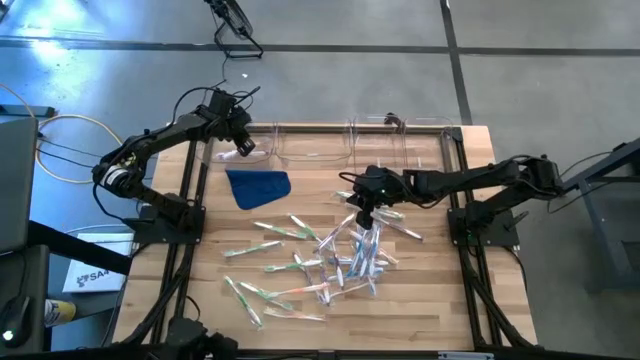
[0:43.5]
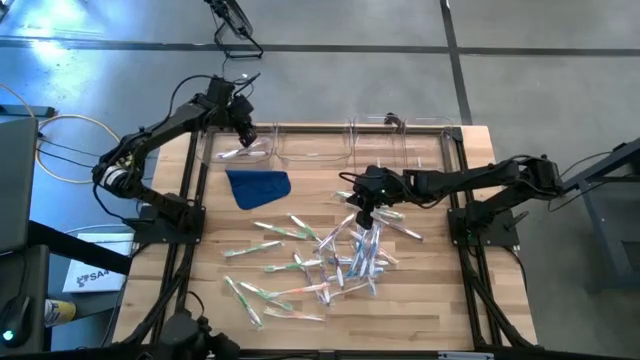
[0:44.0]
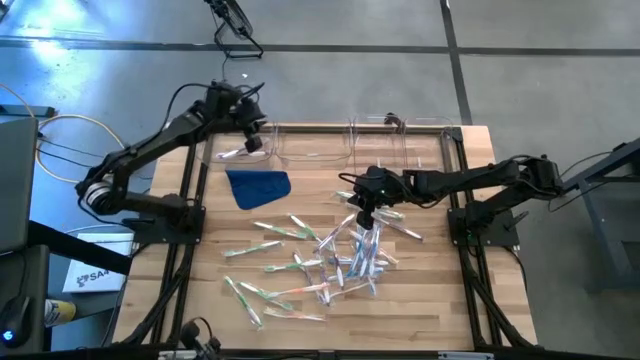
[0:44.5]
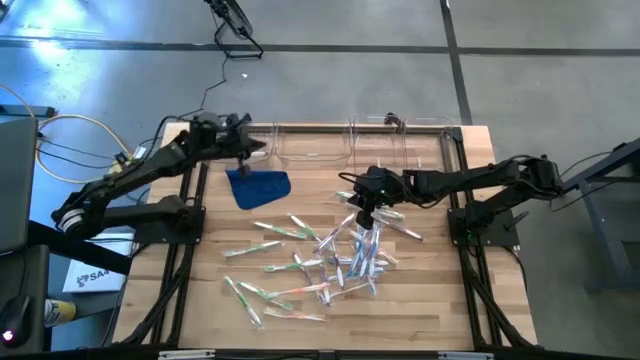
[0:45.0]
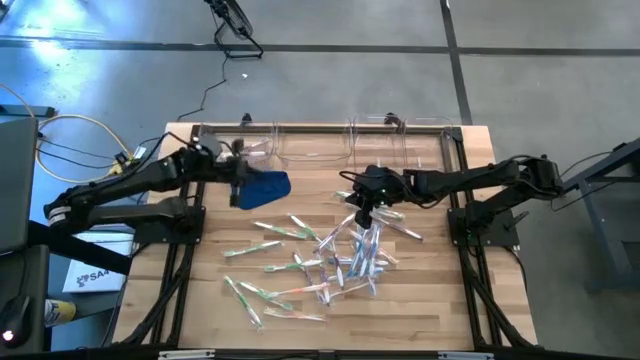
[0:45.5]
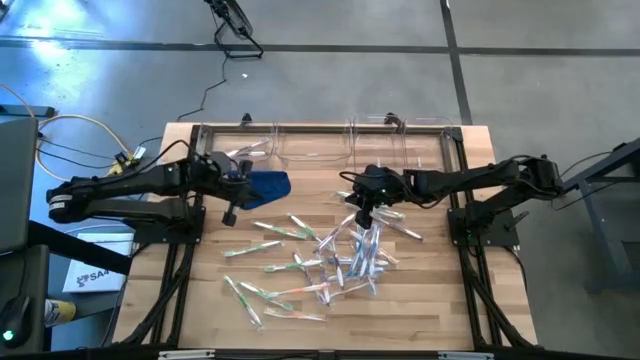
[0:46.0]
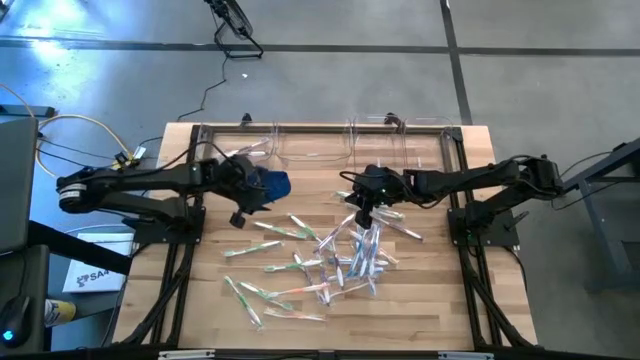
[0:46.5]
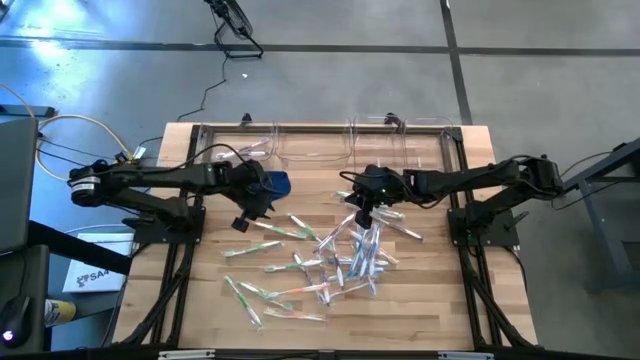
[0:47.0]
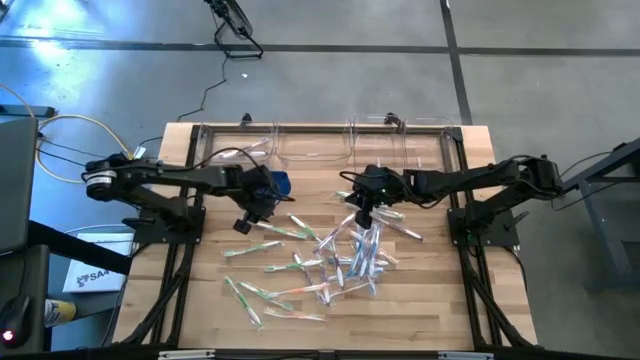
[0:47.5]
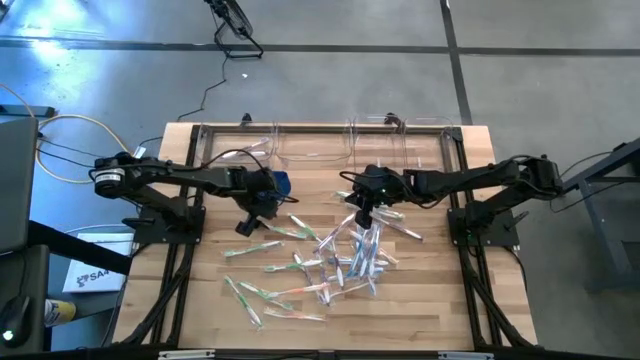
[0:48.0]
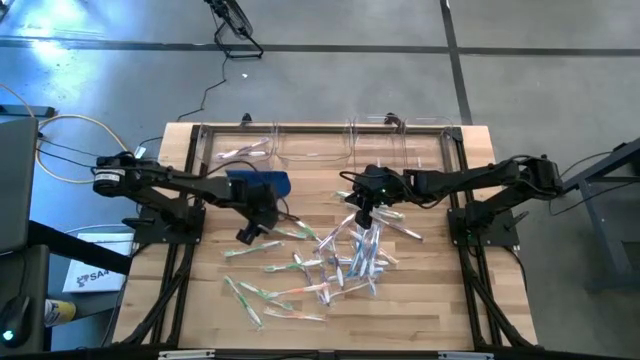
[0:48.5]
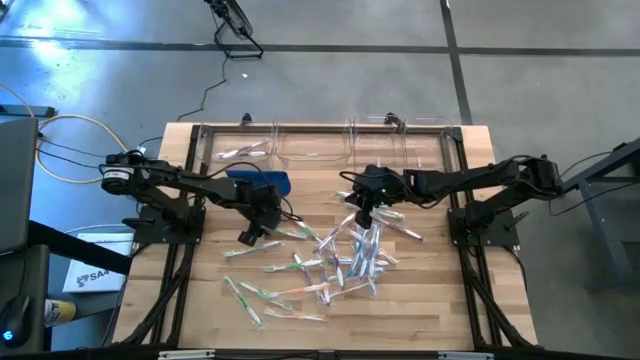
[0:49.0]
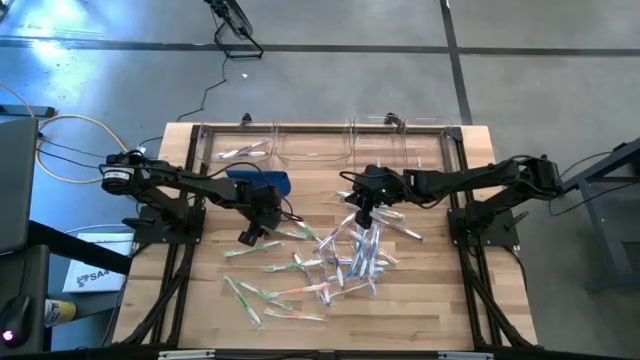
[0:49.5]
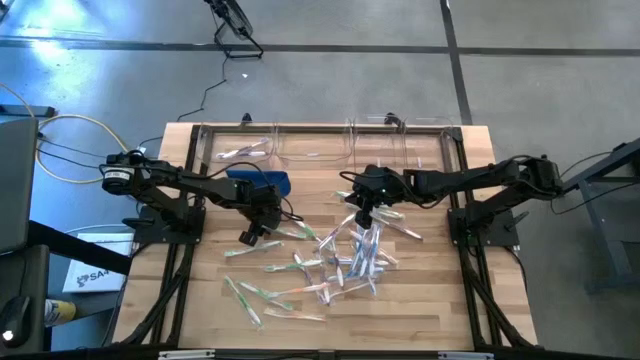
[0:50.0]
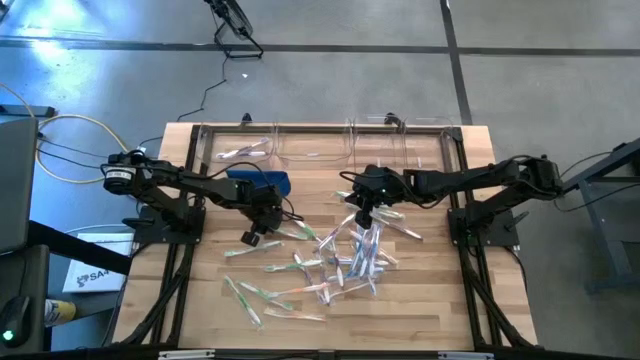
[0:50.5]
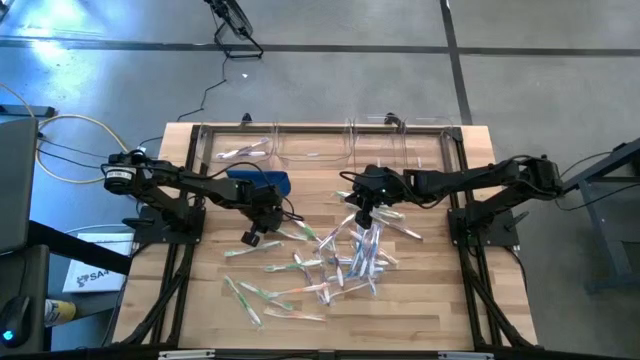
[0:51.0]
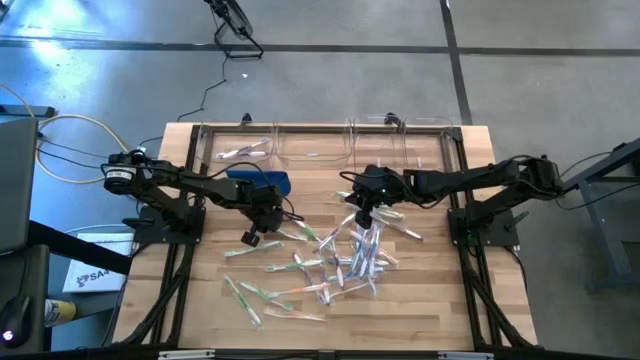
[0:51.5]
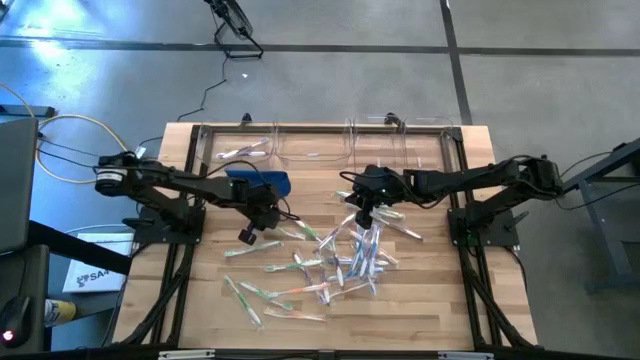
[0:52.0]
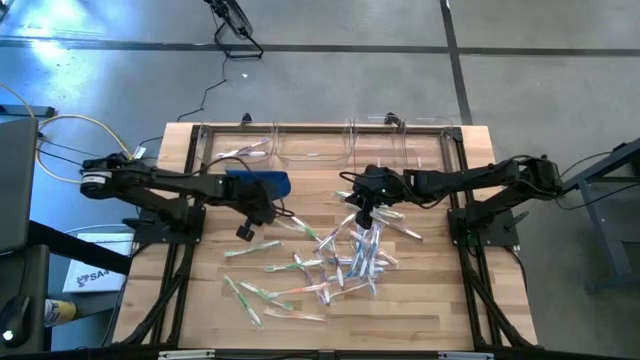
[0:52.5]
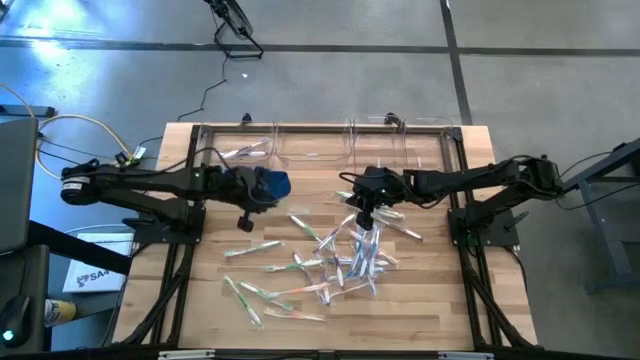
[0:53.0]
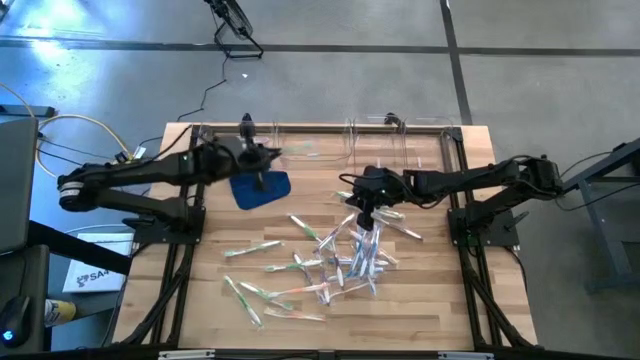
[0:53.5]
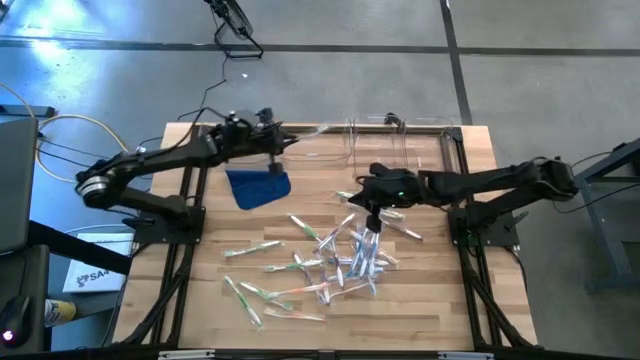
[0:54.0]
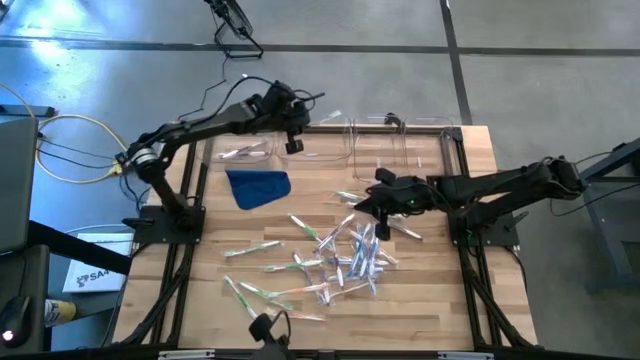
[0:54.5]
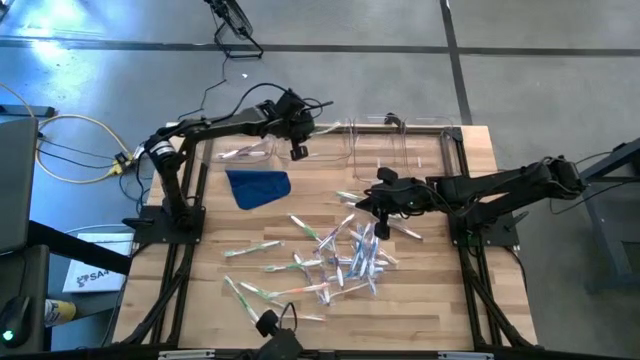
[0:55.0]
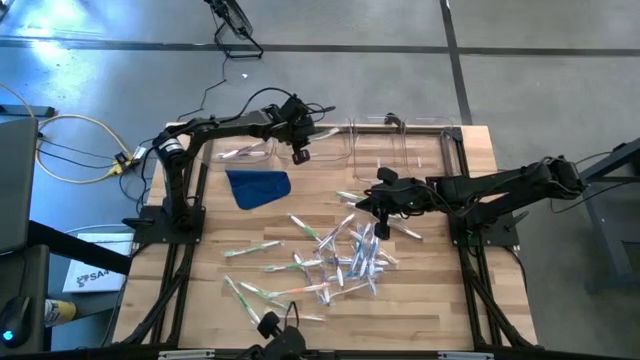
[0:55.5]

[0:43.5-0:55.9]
Task: Pick & Place Toothbrushes
Put the green toothbrush into the middle left transparent bin

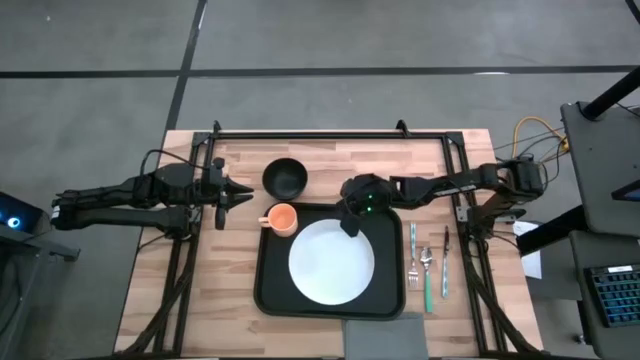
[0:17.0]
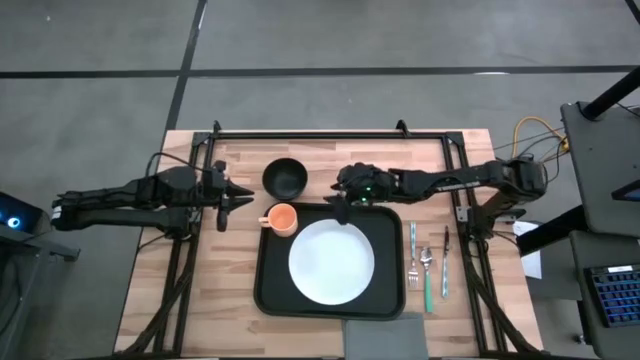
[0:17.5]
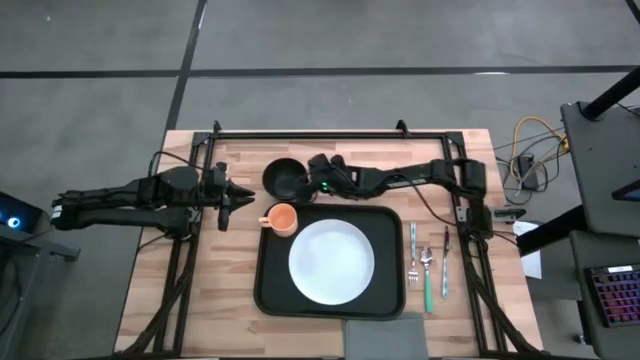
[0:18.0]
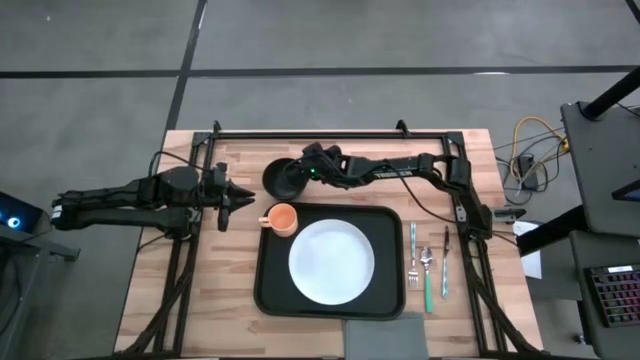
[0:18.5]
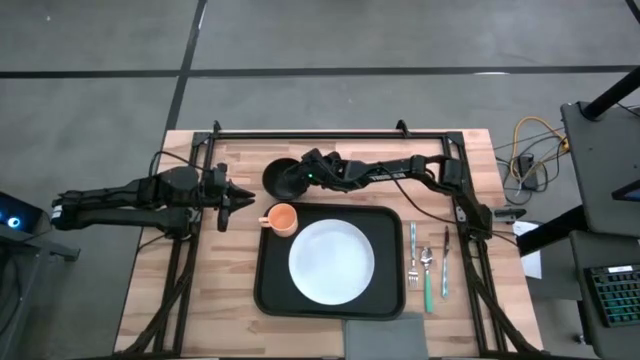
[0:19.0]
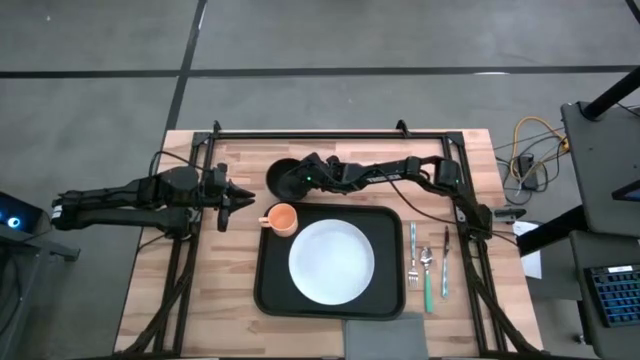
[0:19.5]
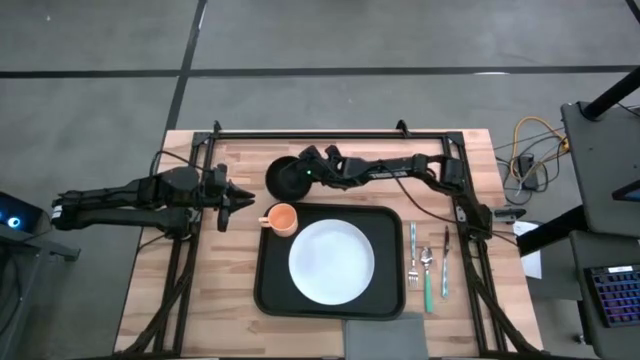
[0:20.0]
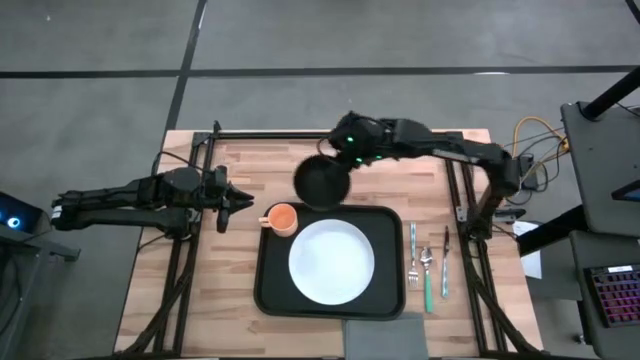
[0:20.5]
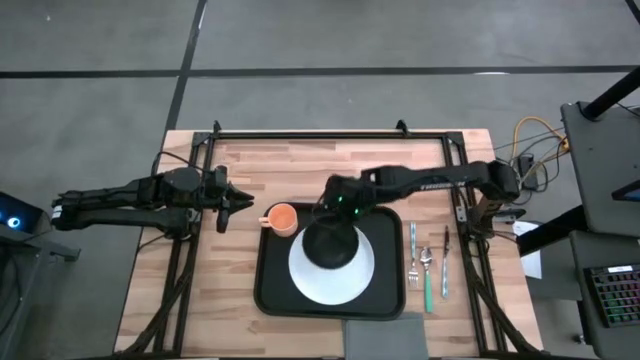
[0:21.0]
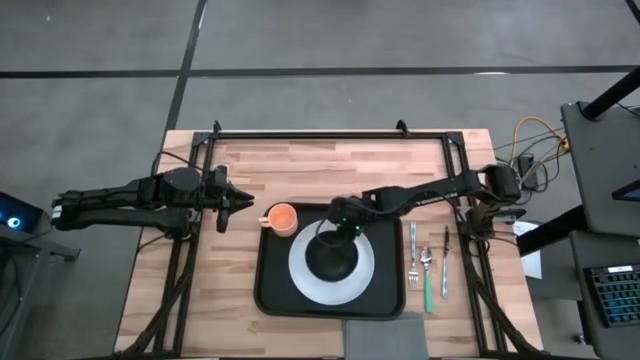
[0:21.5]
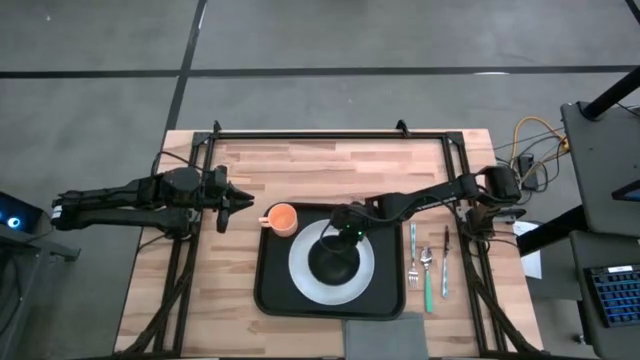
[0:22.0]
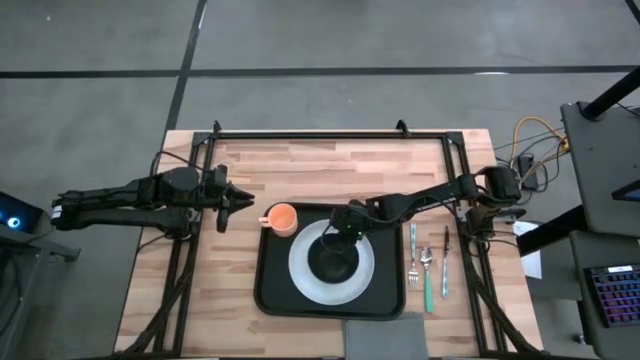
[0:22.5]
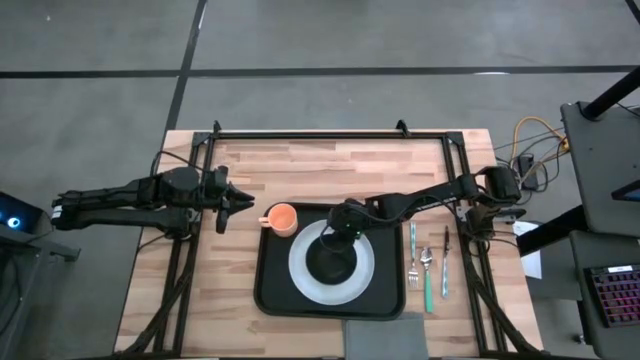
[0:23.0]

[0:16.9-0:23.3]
Task: Set up tray
Put the black bowl on the white plate

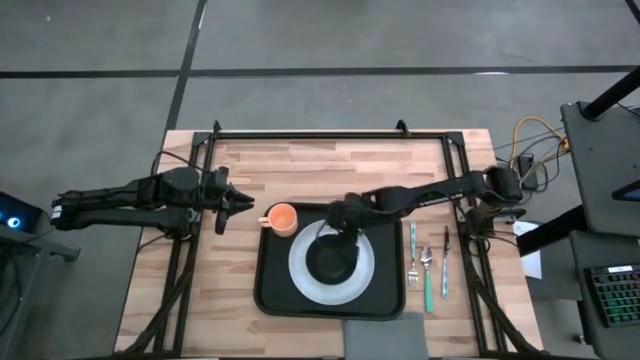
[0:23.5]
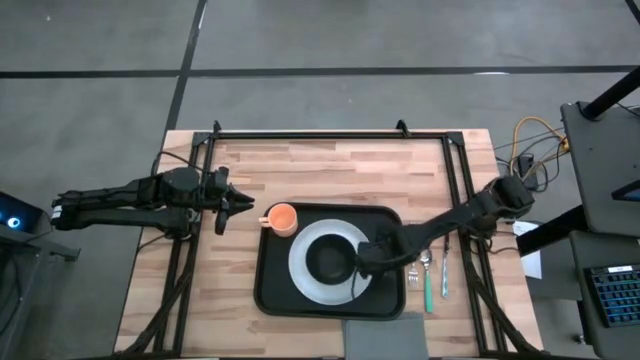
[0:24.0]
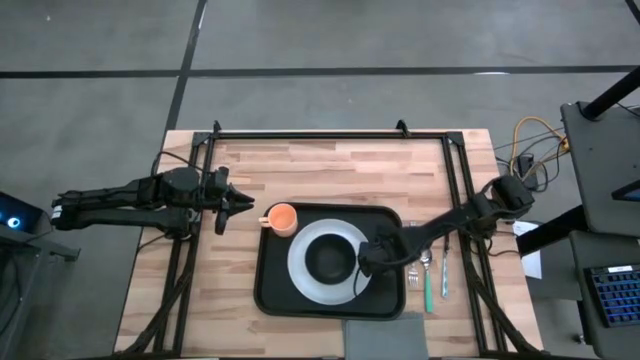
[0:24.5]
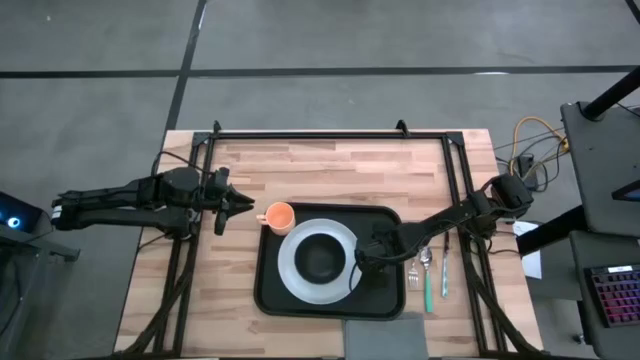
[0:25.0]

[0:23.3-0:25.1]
Adjust the white plate
